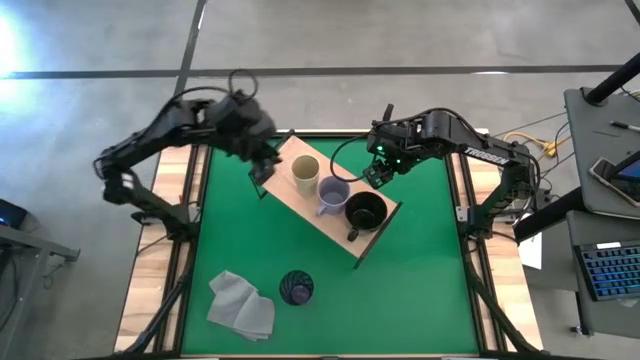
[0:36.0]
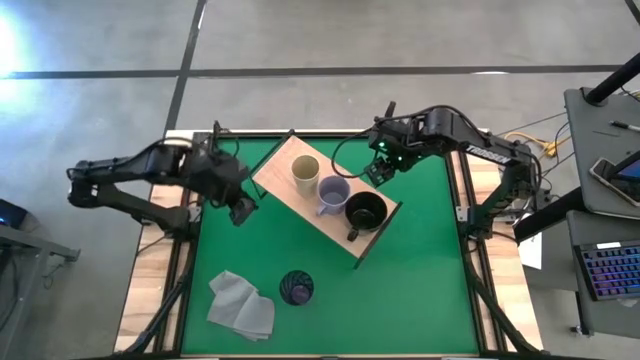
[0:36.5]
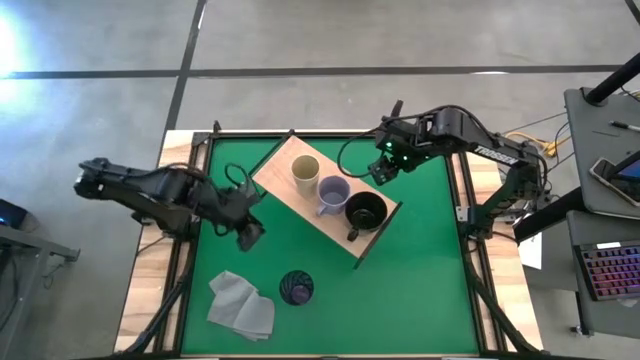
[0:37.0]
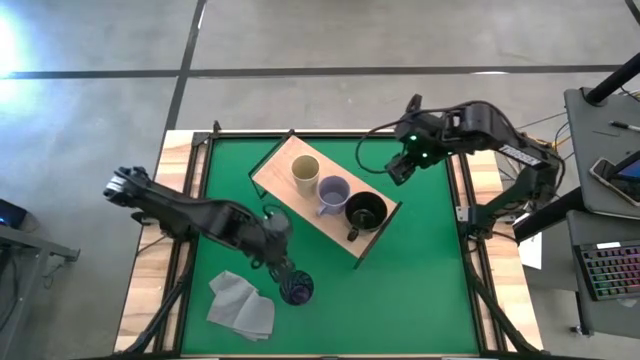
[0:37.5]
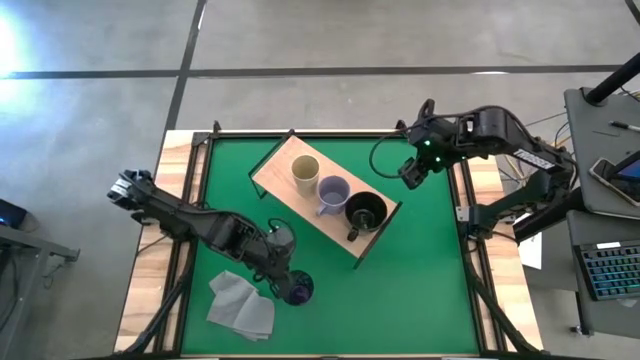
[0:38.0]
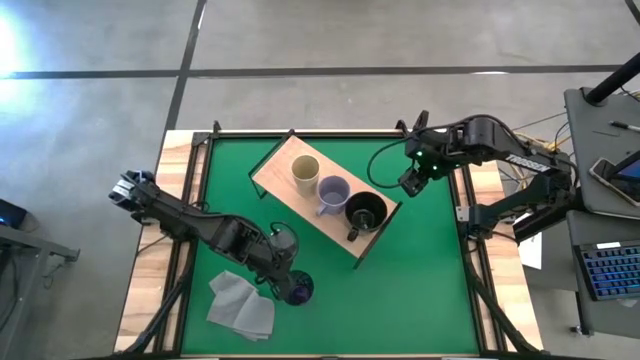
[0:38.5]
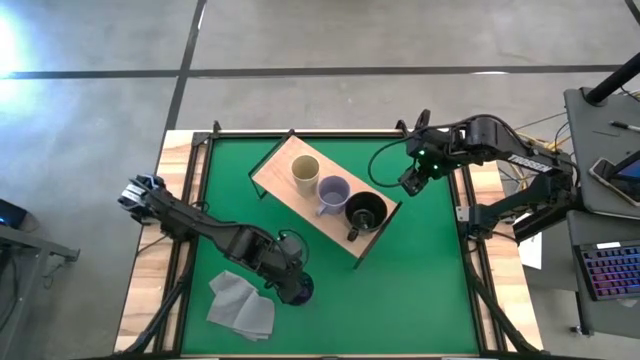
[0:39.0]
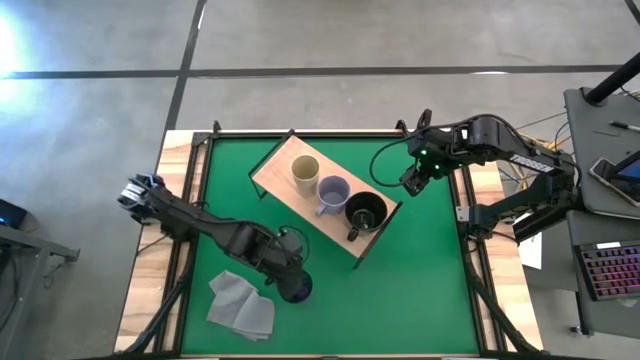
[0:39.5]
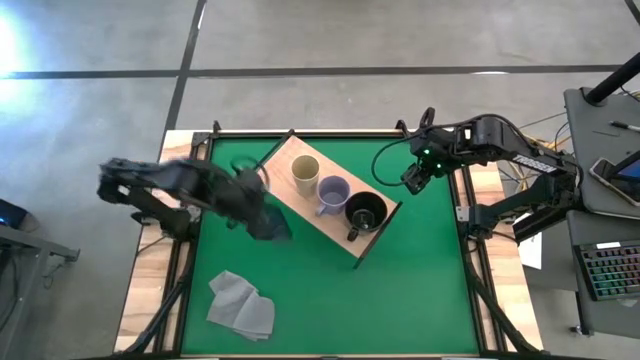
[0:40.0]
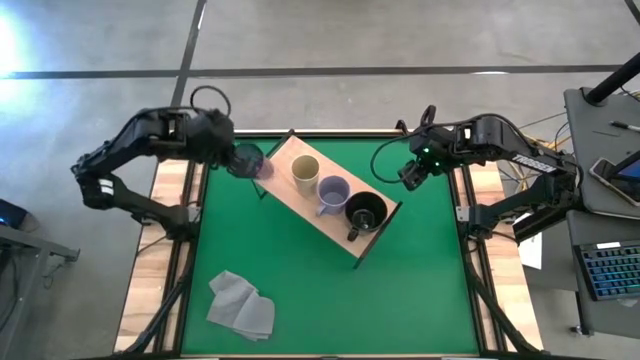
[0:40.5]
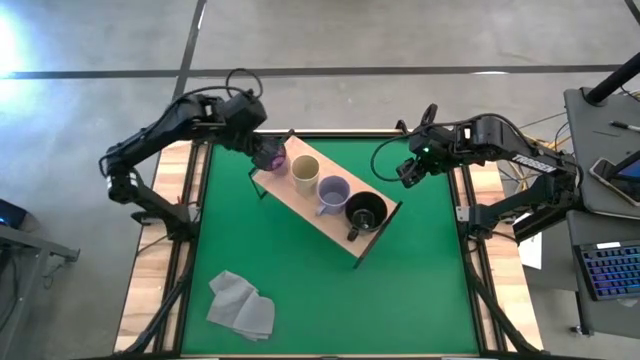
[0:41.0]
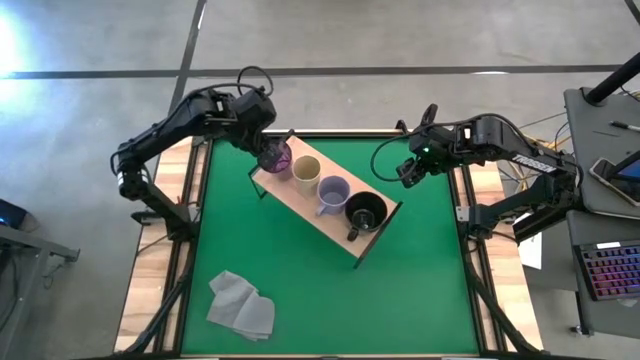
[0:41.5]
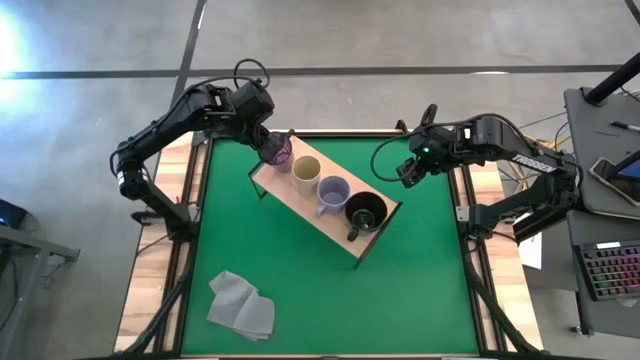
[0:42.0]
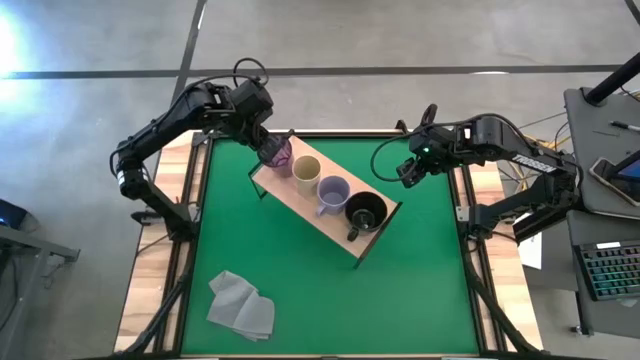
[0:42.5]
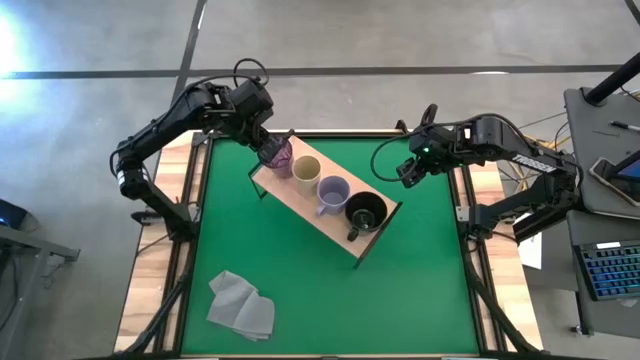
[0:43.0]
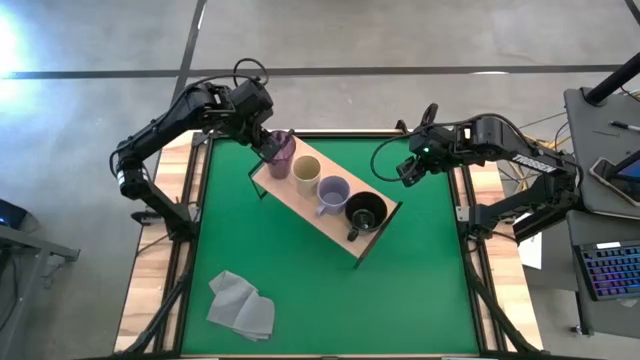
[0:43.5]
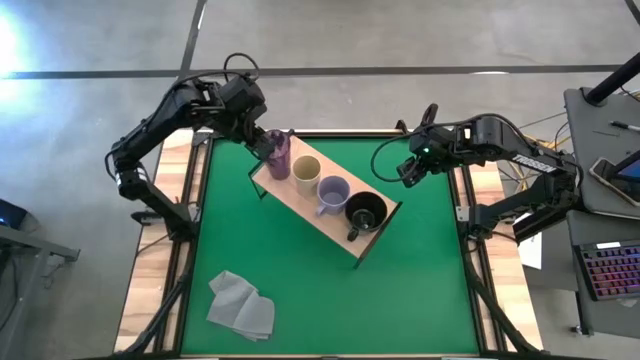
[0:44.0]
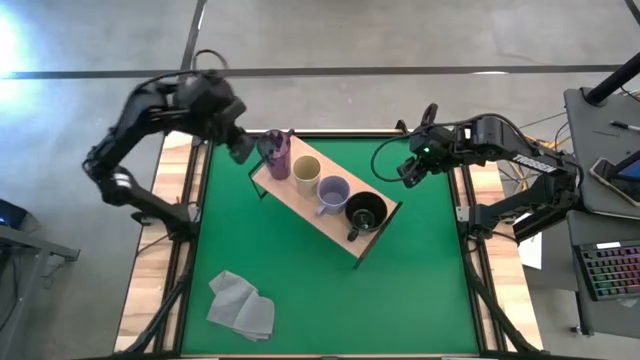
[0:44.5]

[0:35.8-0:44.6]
Task: Stack small to large cups/mugs on shelf
Put the purple cup on the shelf

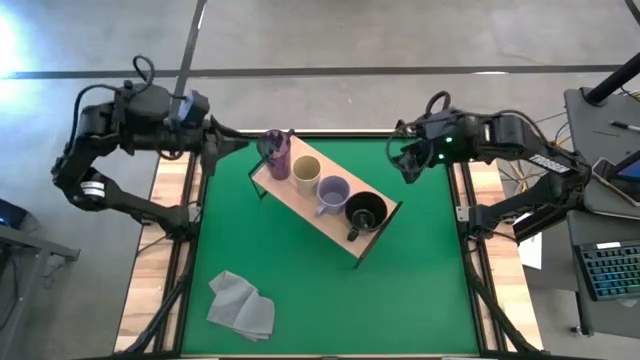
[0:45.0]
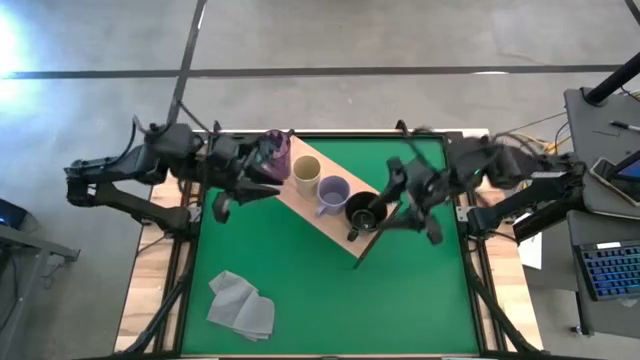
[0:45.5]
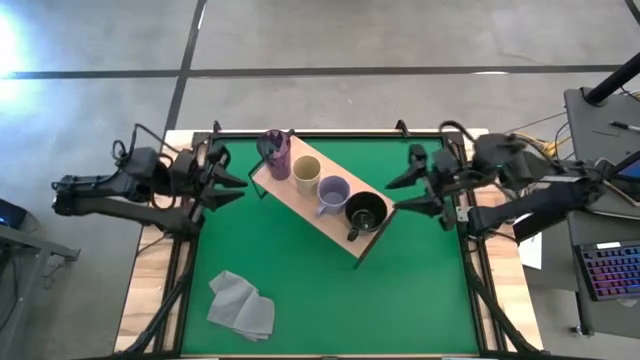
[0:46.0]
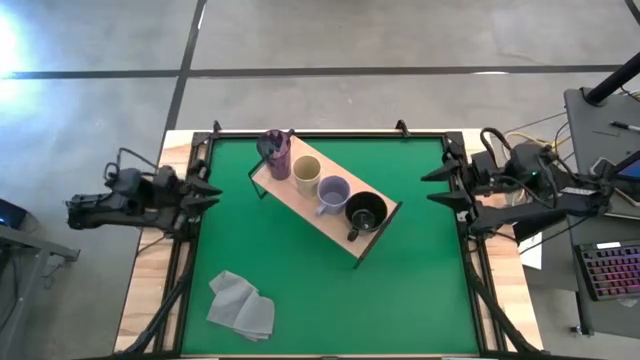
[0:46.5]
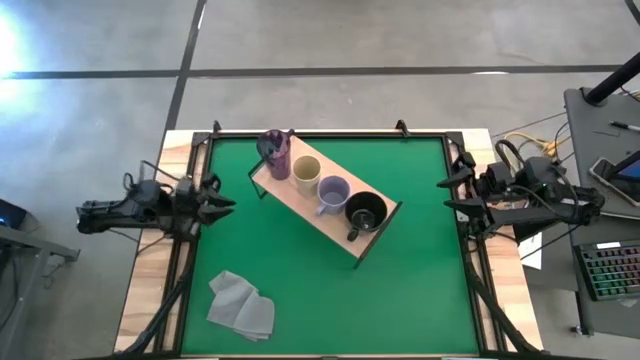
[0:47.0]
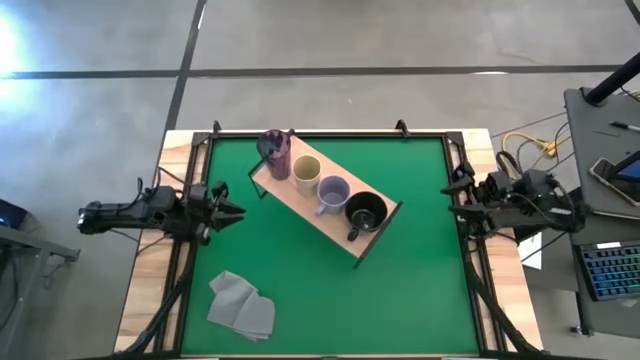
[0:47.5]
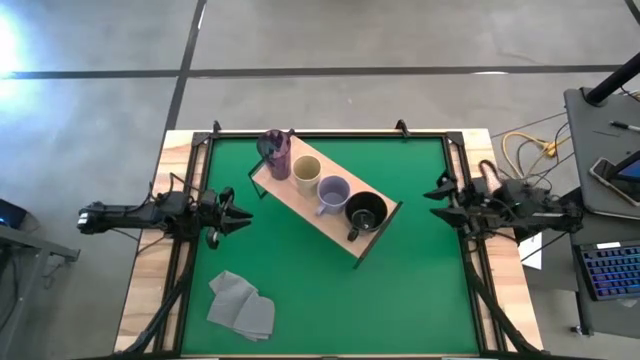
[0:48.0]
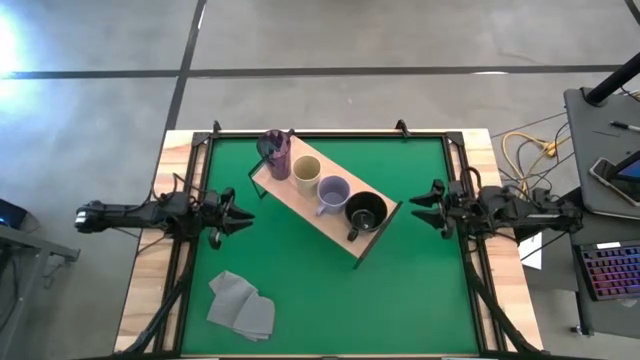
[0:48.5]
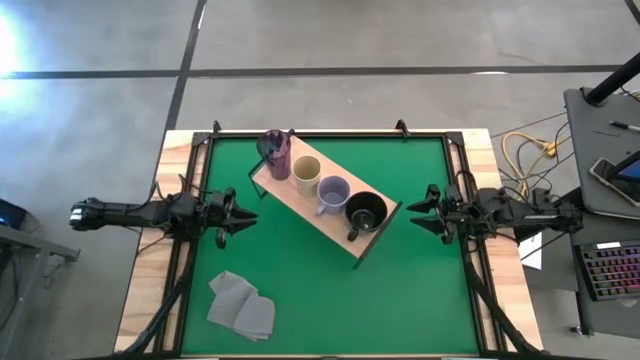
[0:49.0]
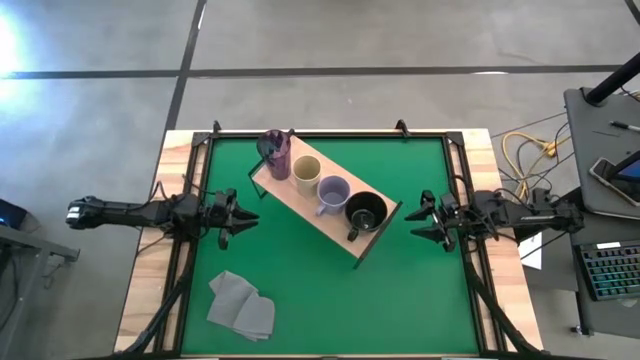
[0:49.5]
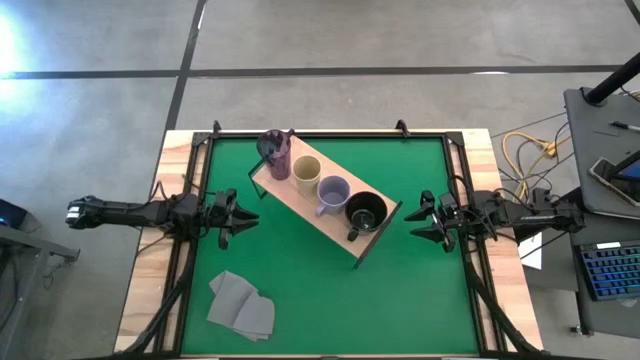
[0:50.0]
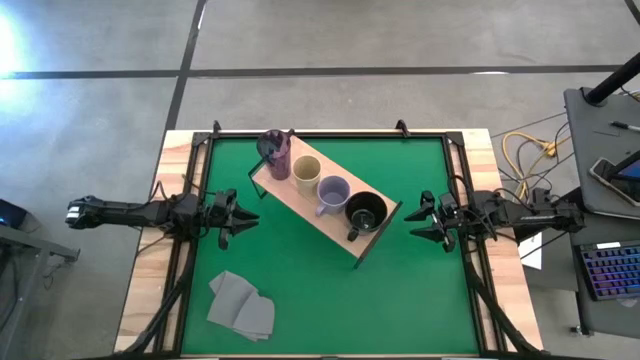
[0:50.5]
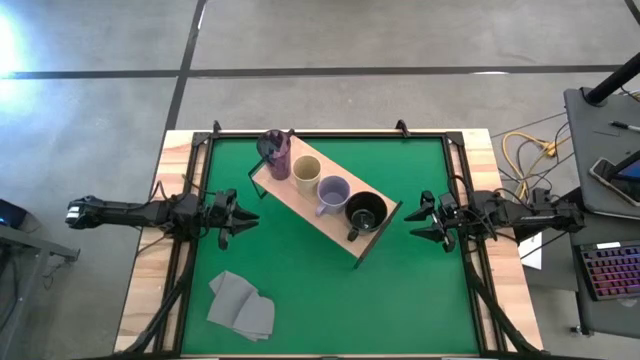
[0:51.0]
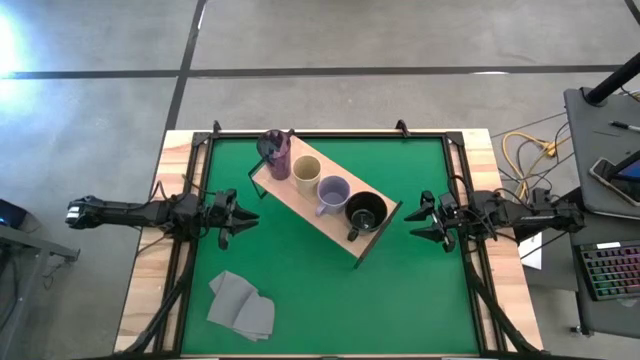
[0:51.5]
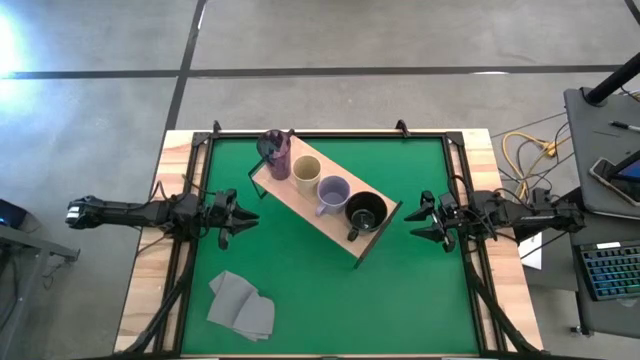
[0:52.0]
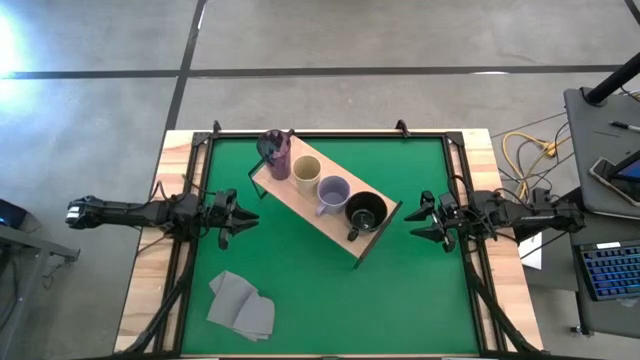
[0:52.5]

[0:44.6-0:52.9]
Return to Home Position
